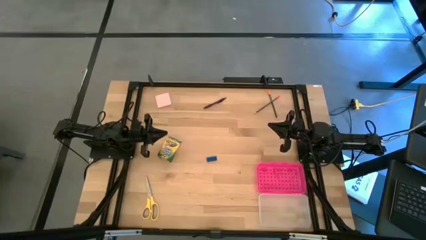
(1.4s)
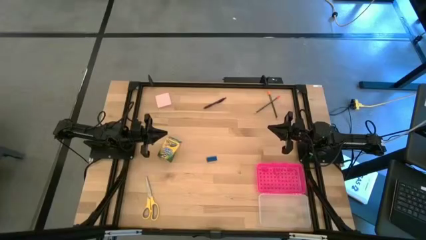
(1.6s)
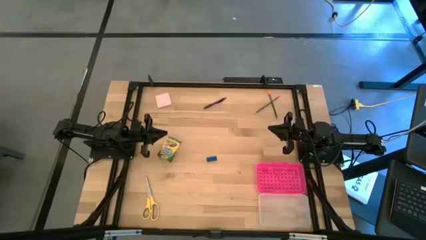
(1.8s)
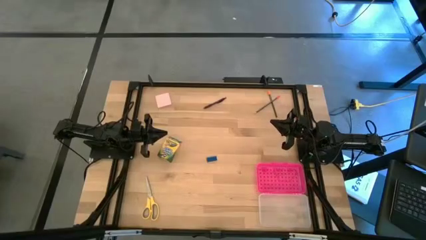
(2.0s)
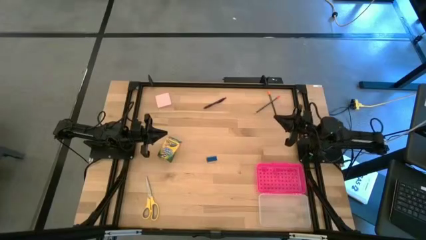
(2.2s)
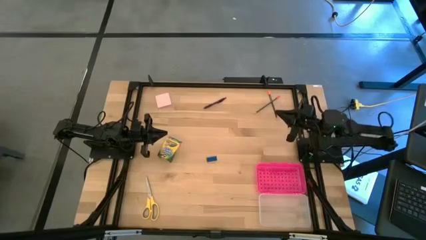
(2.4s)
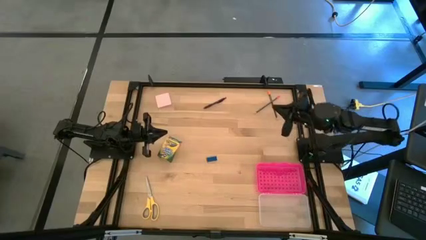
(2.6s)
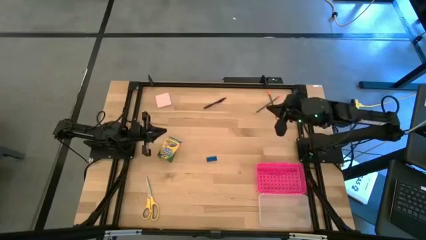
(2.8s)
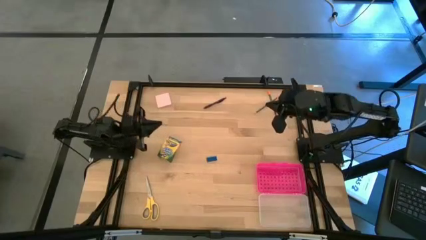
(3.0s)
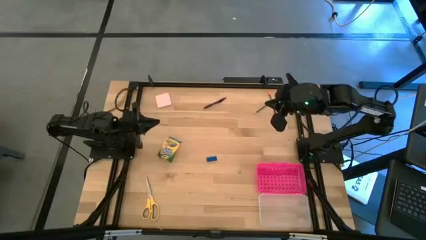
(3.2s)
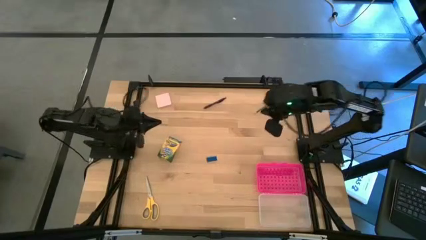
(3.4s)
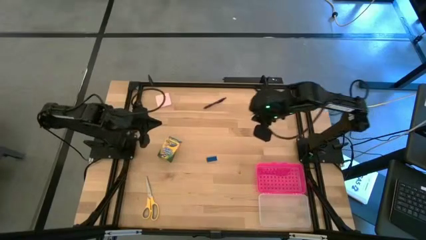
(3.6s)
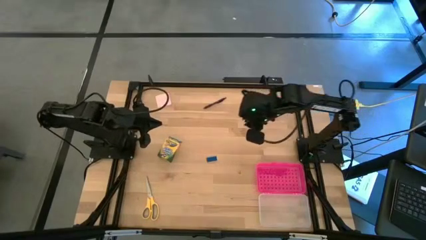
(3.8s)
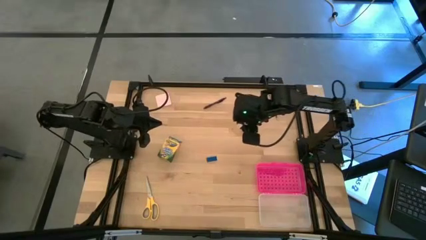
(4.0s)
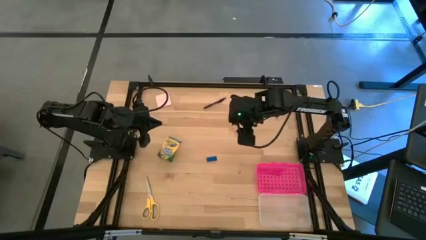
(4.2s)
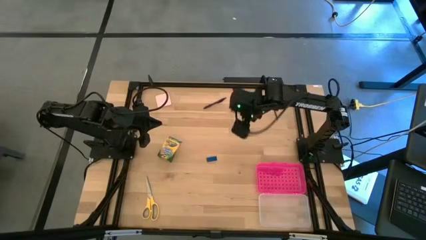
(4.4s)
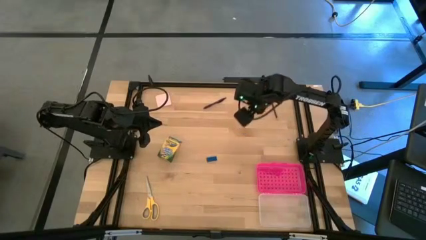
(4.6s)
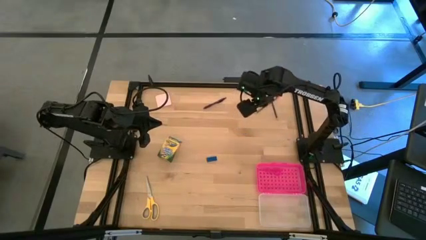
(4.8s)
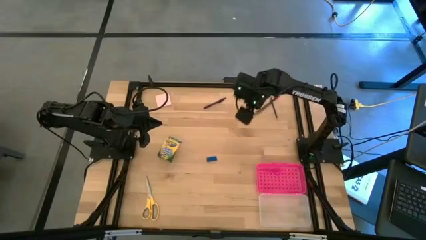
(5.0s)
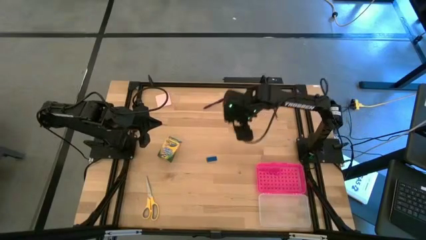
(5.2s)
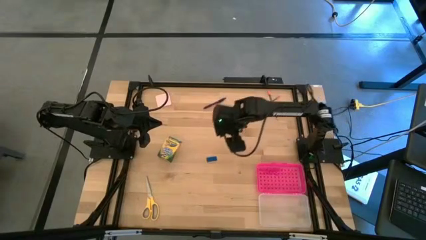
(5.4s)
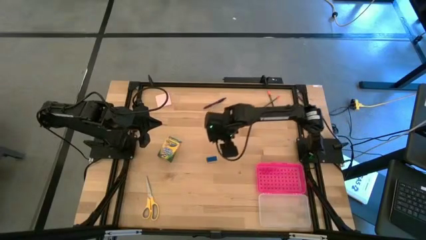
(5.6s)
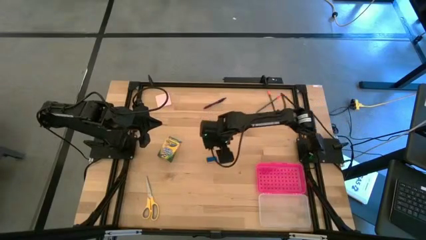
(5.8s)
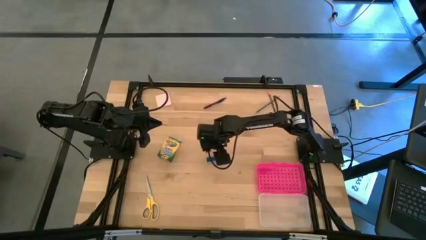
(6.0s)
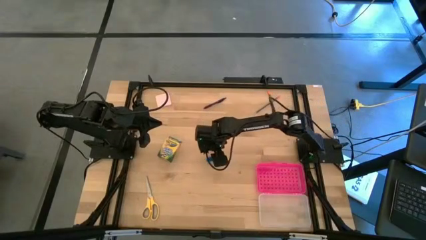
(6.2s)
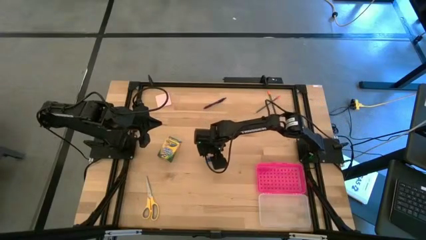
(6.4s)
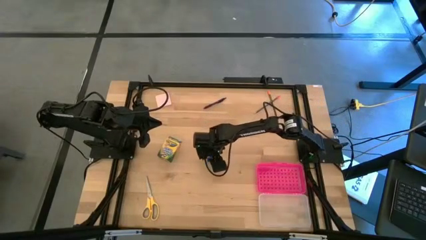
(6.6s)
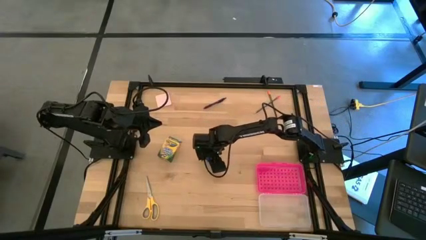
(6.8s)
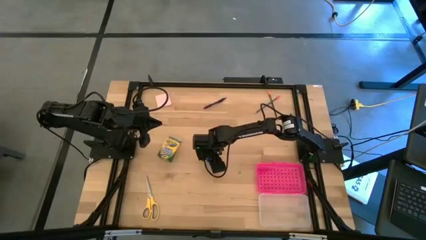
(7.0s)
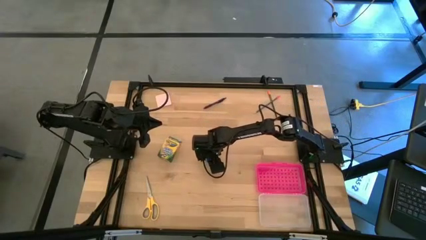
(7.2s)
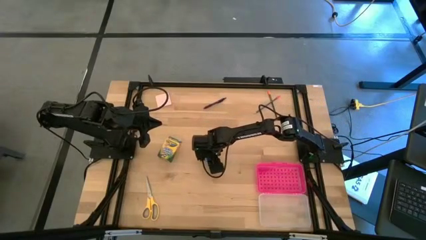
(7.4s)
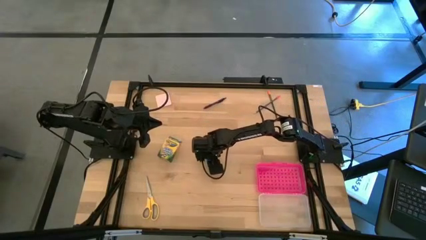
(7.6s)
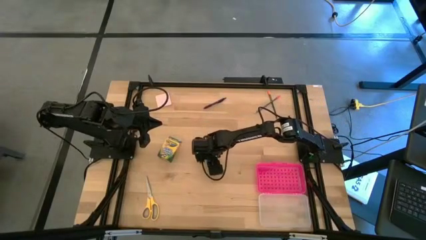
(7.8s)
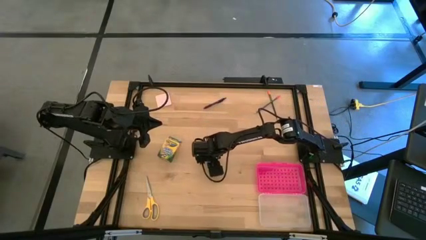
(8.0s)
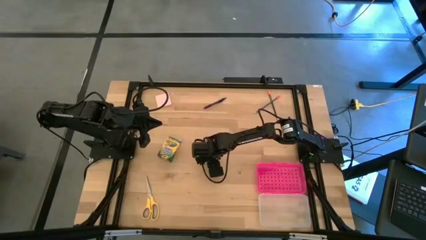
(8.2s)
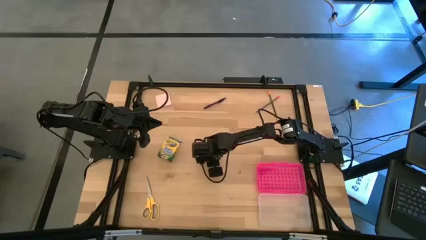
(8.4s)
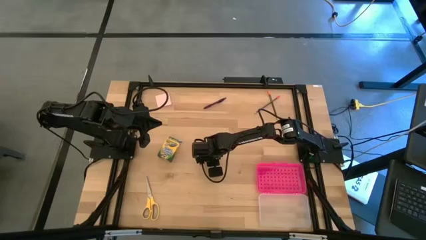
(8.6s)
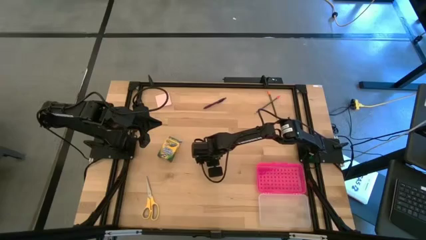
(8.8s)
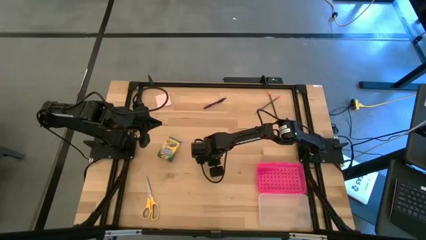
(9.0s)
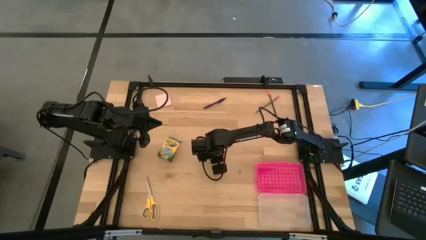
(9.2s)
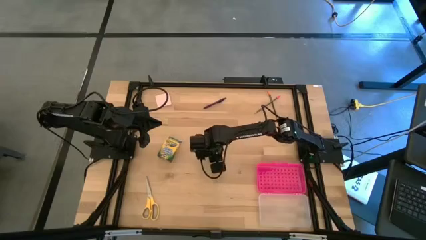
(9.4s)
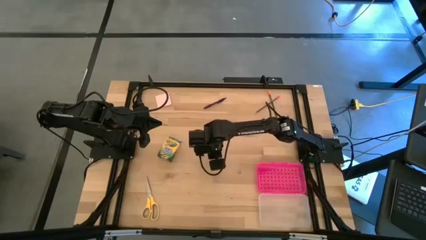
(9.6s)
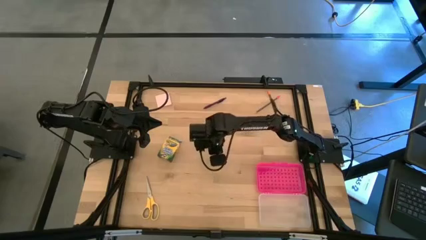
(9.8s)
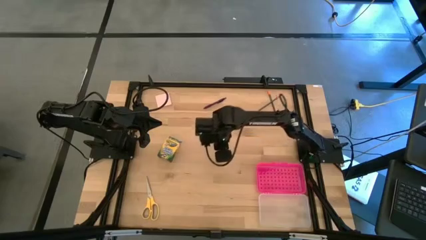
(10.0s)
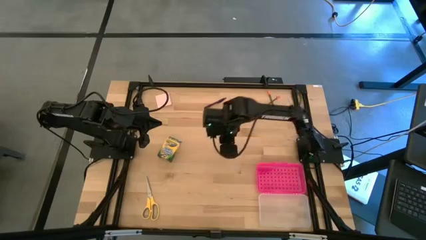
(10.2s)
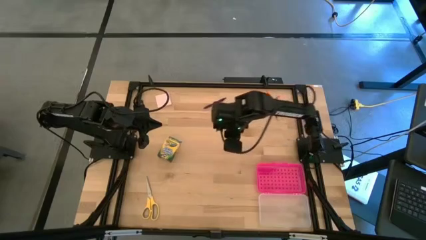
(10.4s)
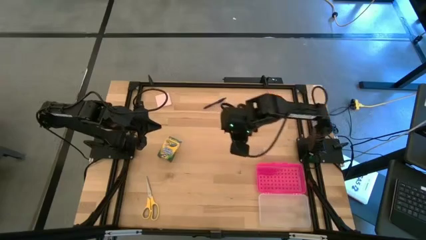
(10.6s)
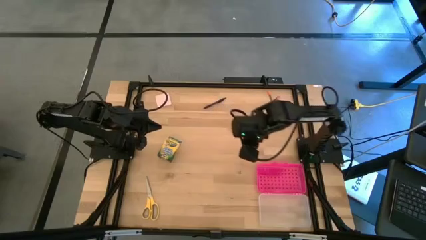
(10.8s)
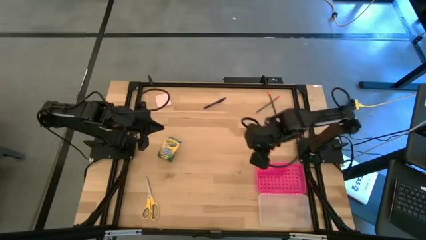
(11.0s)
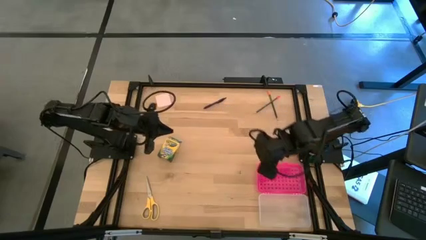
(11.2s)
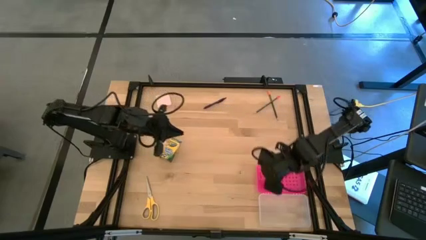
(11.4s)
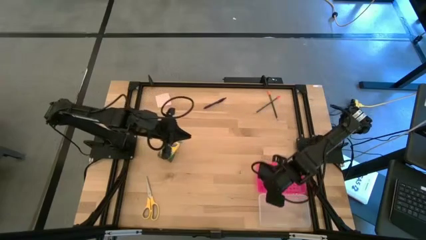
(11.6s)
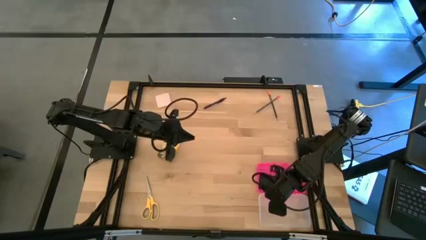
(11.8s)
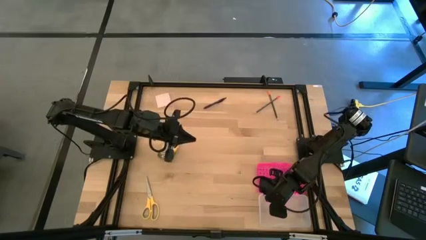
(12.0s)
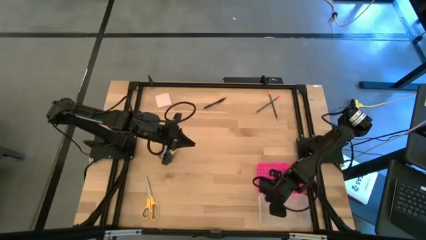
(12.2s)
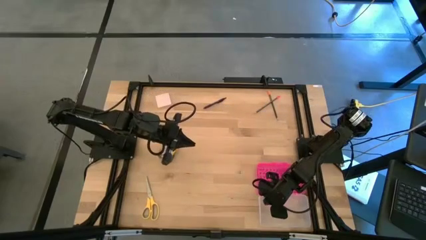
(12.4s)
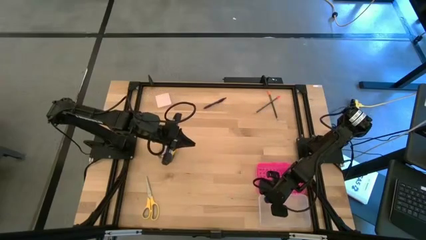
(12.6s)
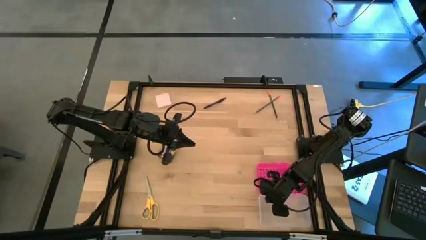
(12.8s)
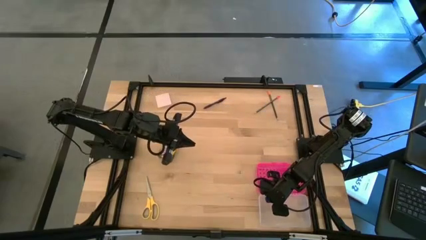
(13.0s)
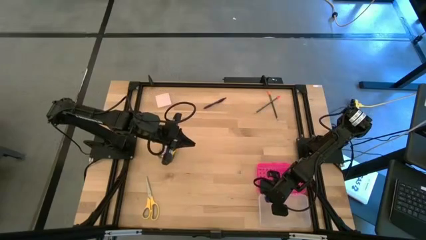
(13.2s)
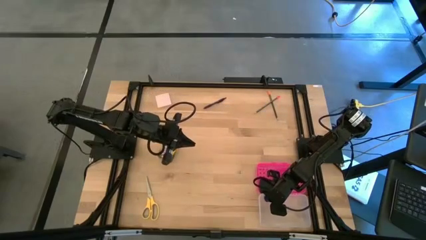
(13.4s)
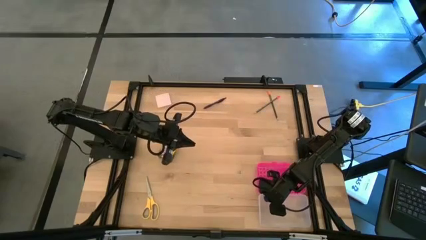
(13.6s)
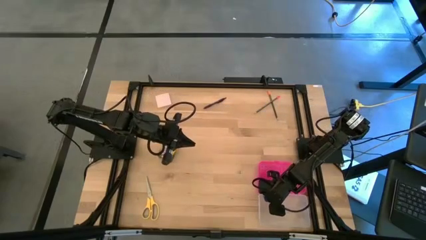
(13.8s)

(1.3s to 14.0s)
Task: Pack school essentials
Put the blue eraser into the pink box
